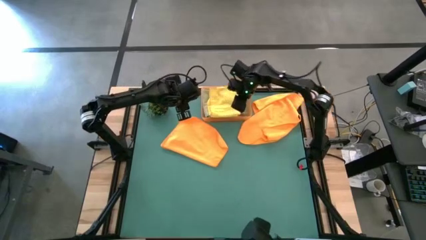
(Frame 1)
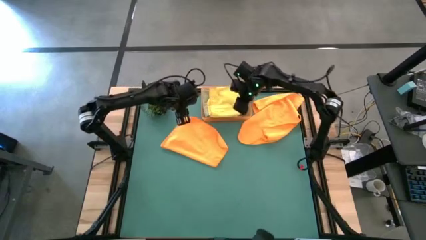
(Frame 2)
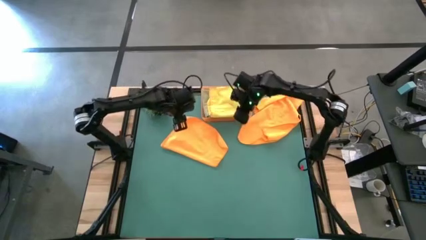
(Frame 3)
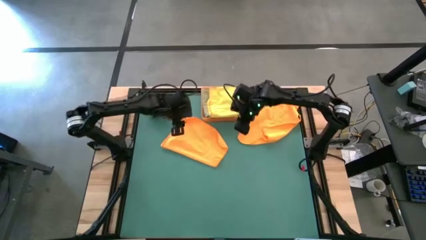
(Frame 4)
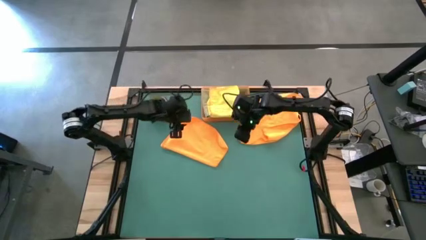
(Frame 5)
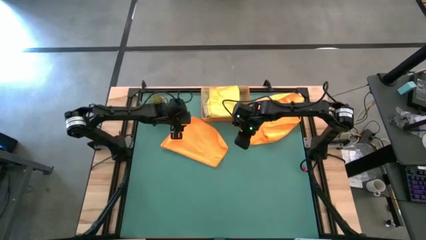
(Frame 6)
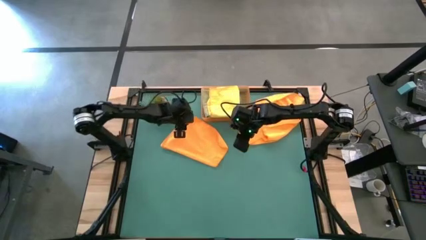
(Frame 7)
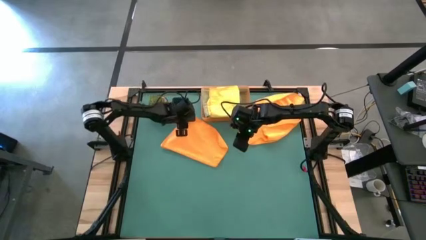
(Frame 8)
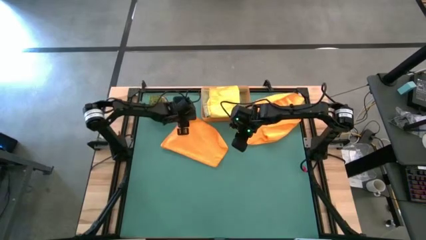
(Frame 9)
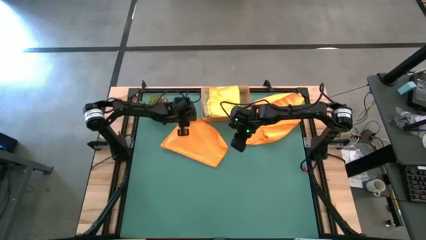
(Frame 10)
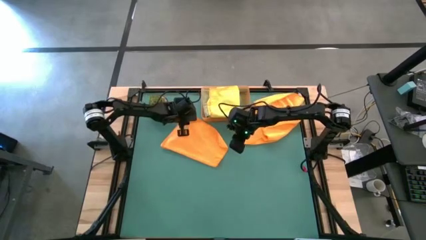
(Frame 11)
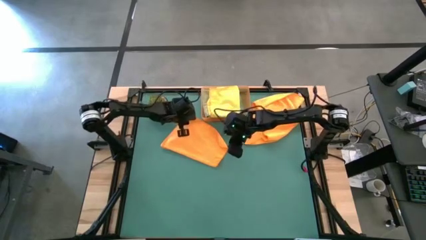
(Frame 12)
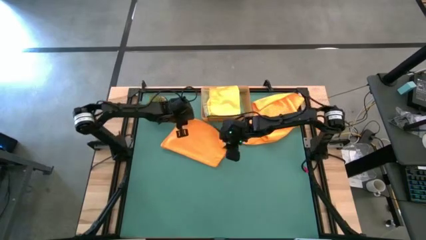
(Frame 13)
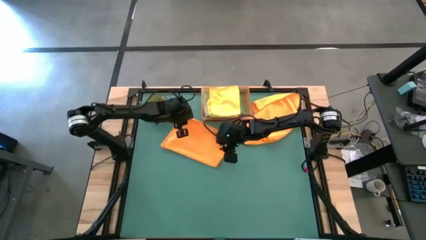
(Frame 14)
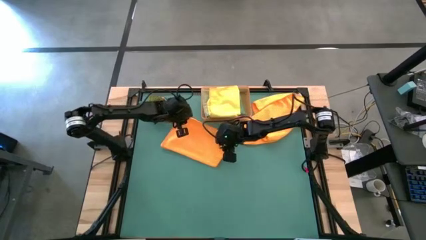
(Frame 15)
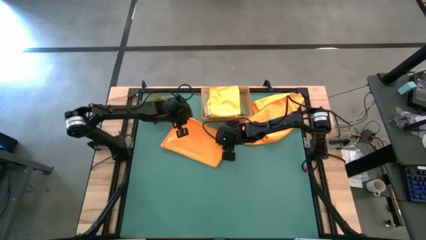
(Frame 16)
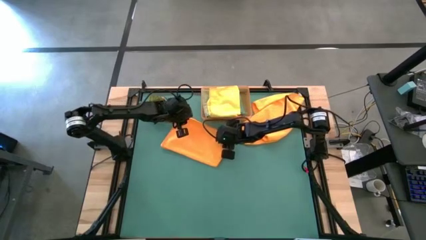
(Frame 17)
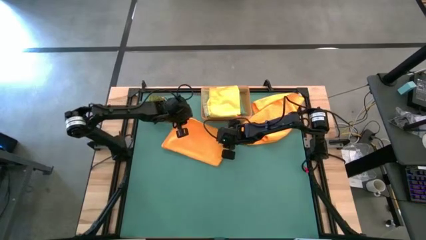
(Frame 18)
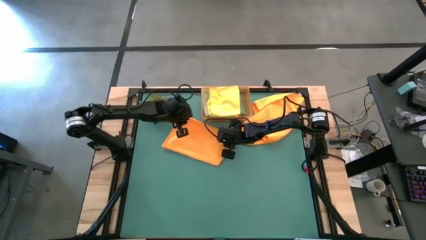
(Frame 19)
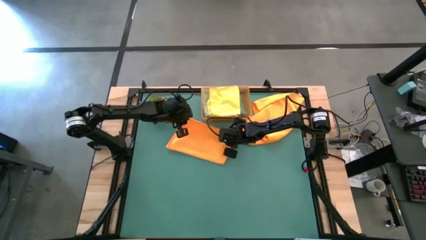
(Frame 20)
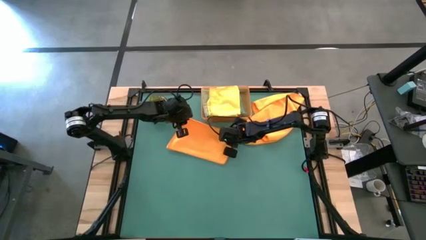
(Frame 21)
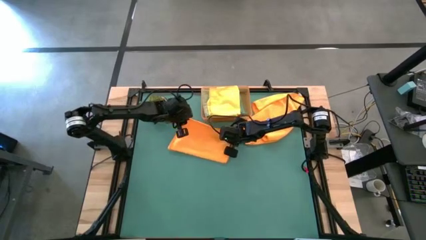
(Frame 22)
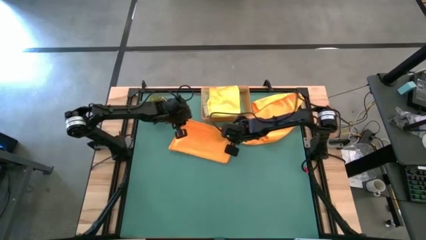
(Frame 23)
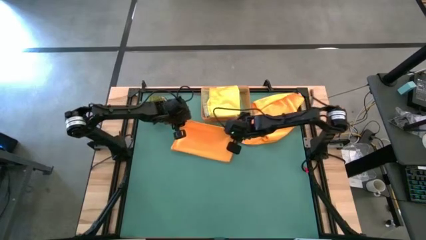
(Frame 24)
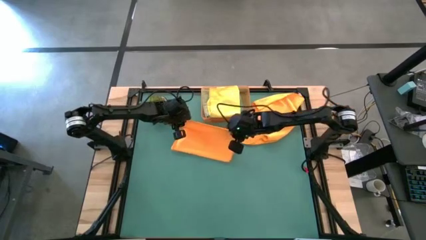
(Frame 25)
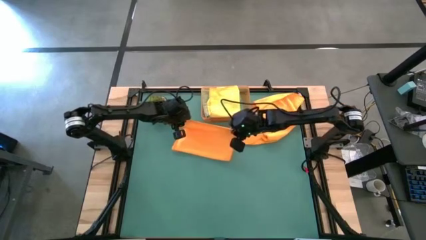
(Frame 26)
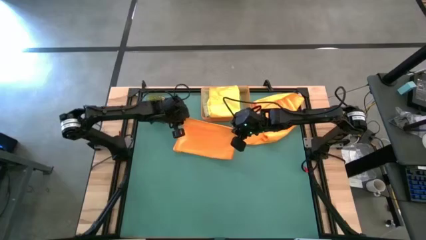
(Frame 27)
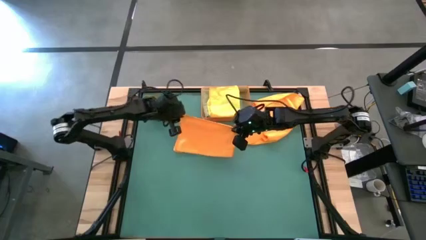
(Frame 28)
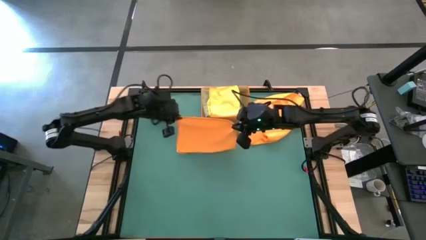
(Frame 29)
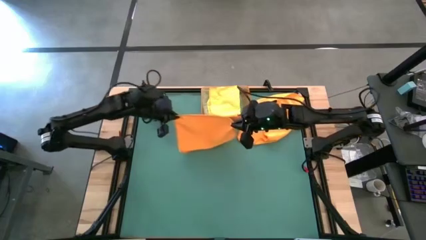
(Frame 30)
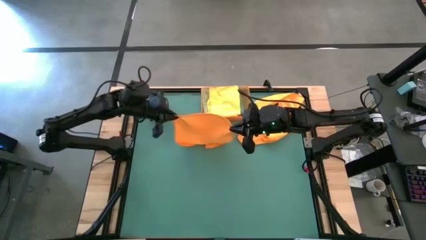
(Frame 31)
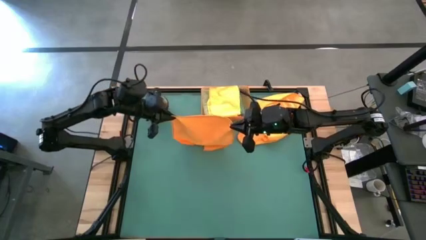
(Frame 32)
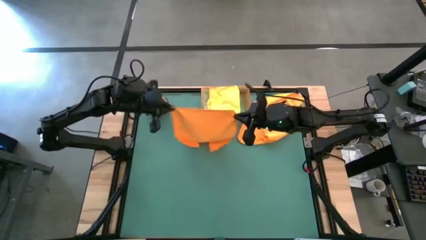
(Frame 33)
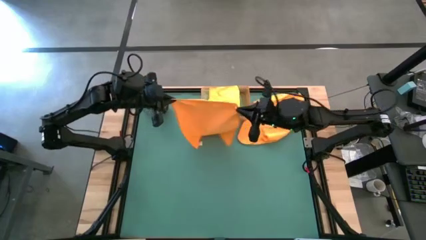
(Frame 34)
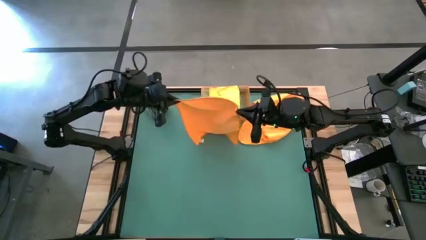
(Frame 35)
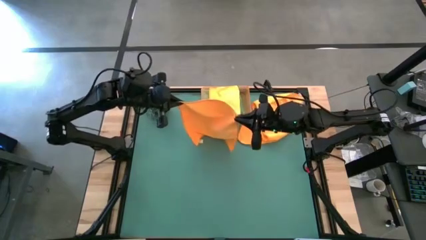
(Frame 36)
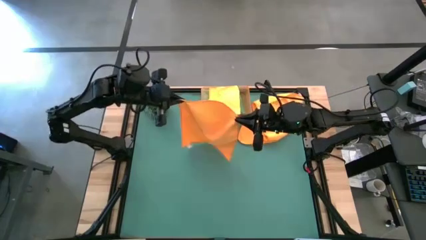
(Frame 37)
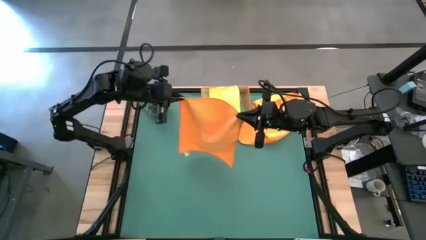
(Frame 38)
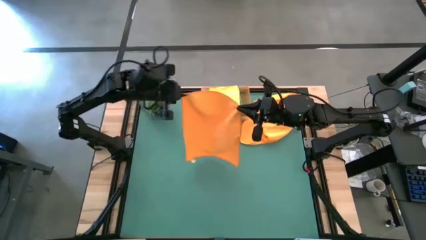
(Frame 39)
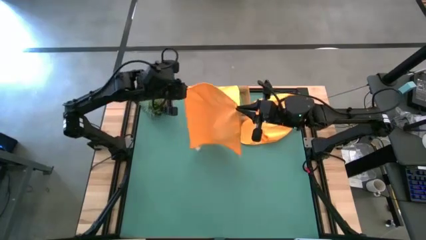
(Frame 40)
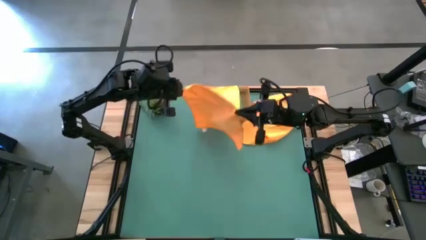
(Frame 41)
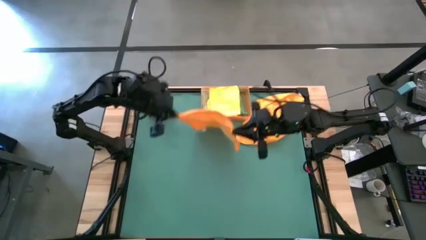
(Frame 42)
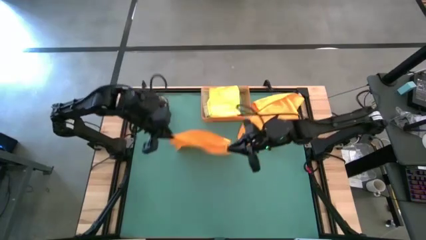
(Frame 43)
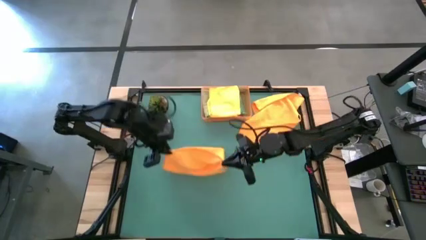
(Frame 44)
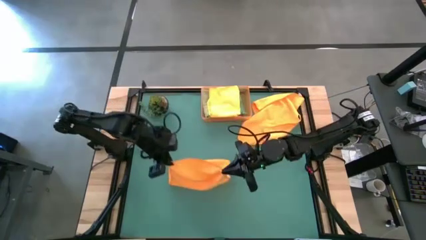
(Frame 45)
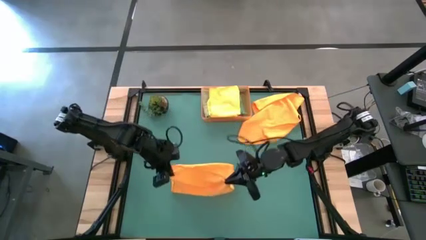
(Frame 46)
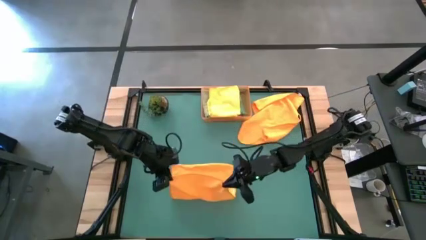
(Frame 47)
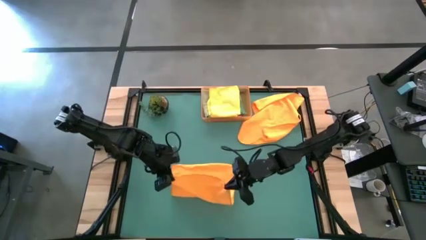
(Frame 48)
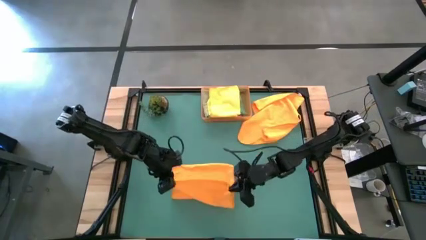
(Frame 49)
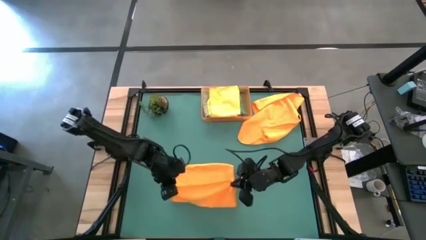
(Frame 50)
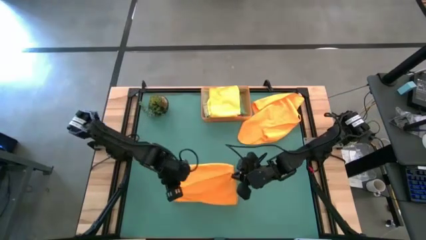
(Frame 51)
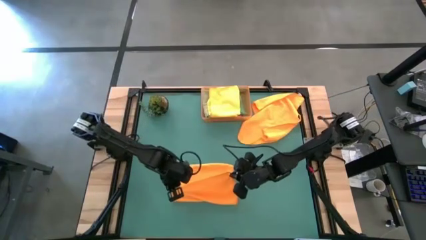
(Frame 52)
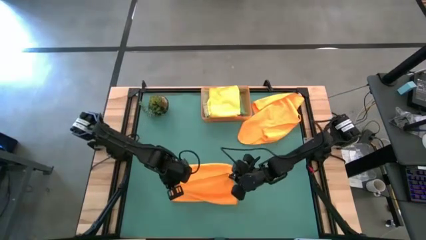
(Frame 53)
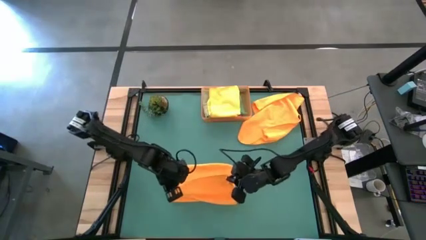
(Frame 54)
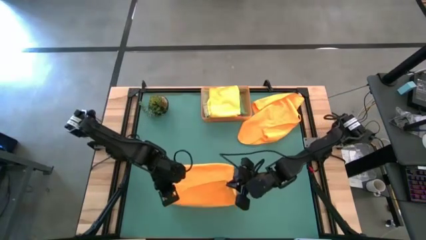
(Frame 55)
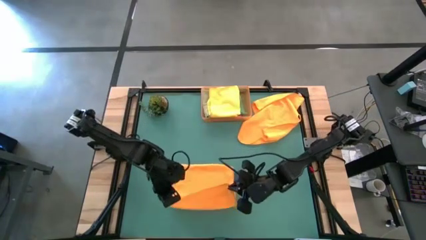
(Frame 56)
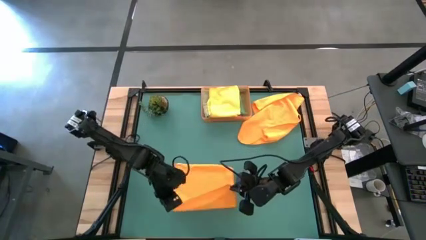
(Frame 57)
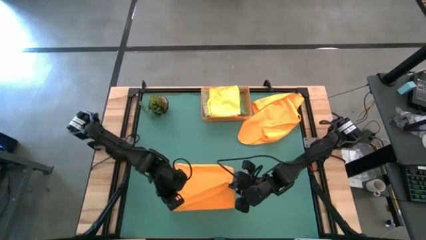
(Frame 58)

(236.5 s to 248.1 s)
Task: Fold microfiber towels
Fold the left orange microfiber towel

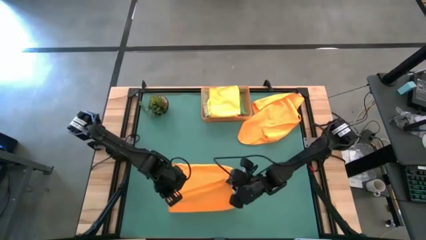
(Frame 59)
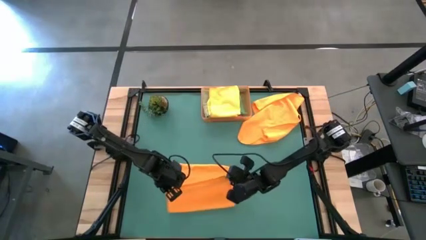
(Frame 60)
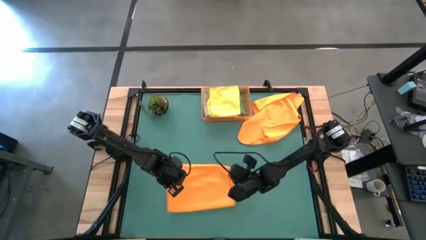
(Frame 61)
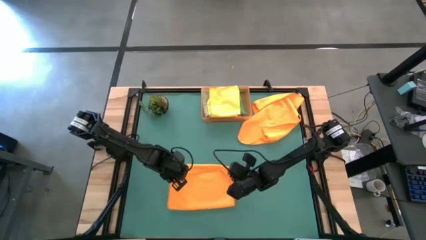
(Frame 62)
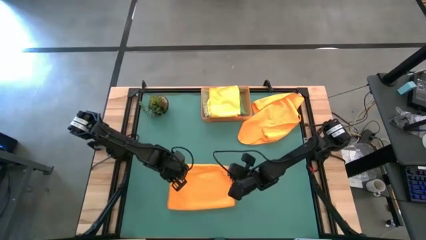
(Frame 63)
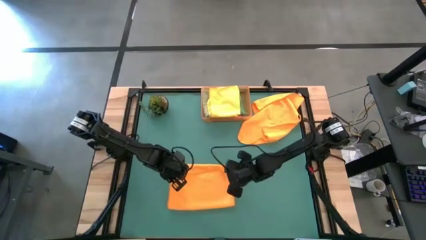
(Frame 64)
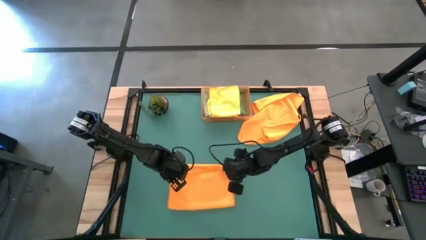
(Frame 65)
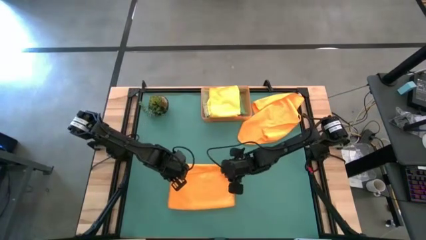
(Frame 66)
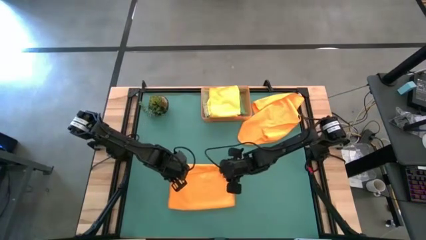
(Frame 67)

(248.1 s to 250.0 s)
Fold the bottom orange microfiber towel
